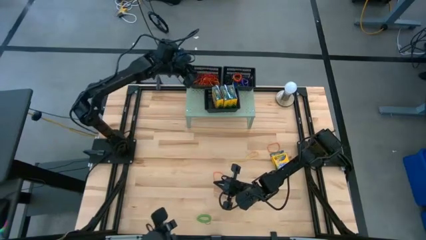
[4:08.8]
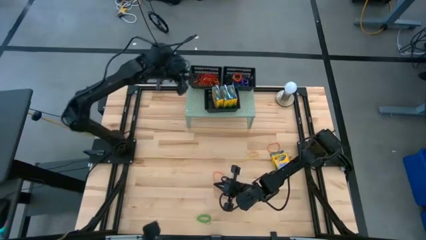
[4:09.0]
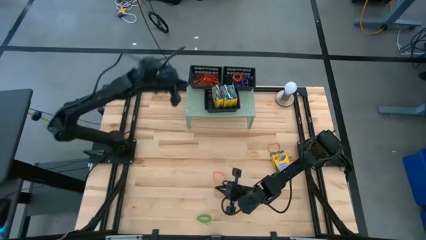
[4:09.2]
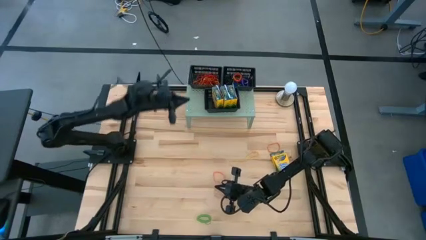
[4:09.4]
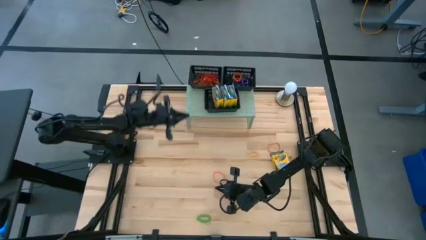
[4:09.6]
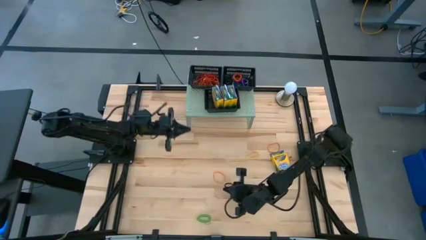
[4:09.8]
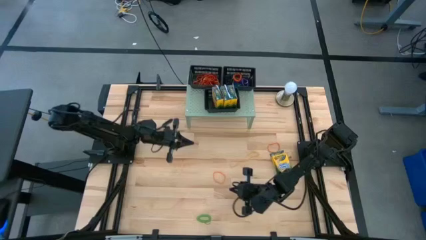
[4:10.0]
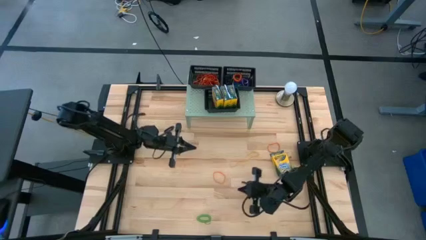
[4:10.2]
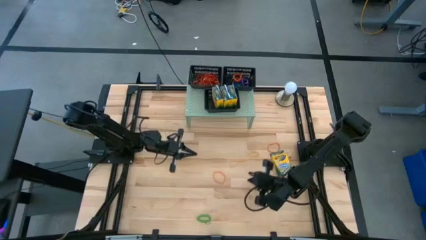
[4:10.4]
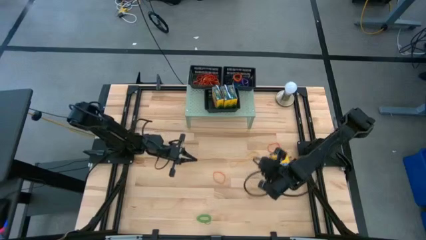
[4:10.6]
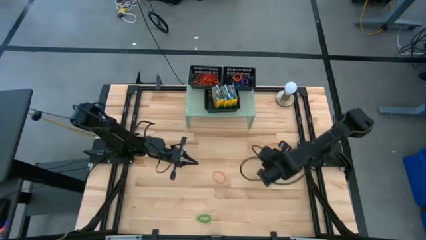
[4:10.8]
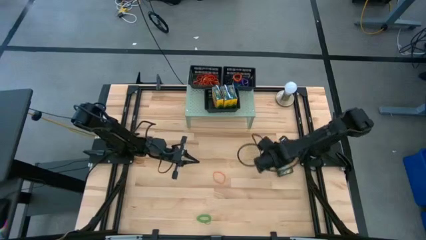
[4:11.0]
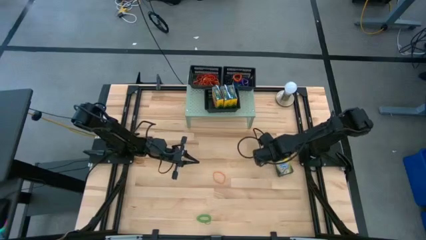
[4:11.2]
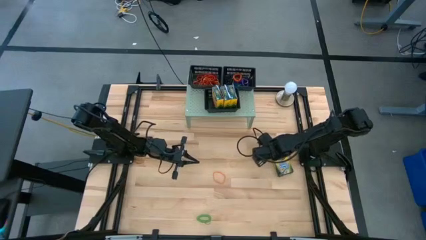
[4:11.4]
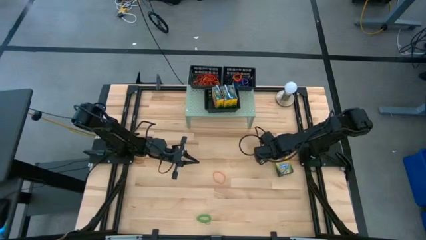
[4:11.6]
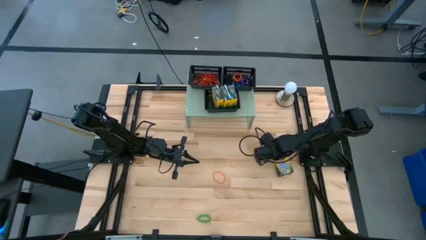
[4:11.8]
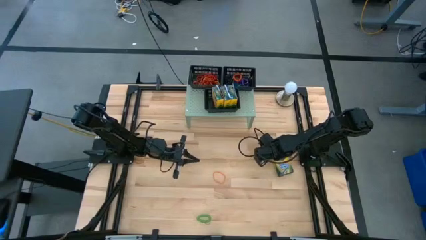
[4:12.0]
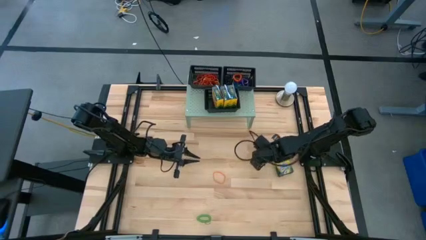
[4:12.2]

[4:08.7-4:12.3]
Task: Pick & Place Office Desk Supplies
Put the orange rubberband into the top left black bin

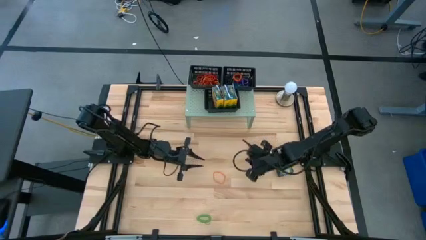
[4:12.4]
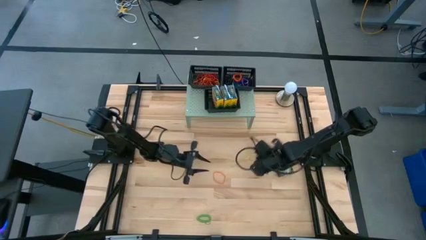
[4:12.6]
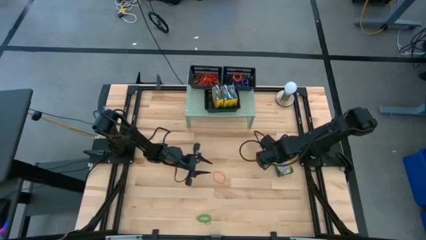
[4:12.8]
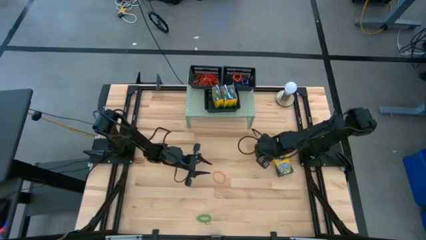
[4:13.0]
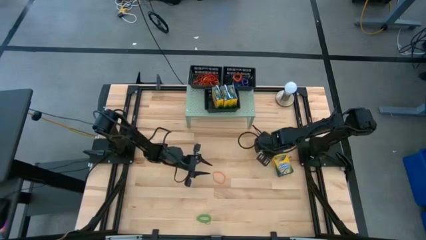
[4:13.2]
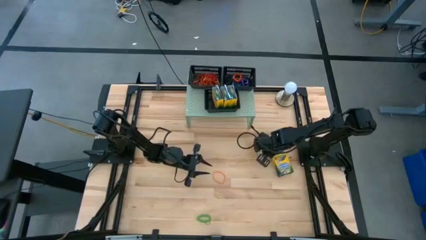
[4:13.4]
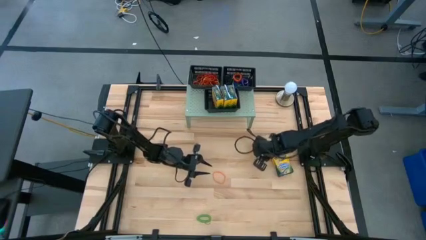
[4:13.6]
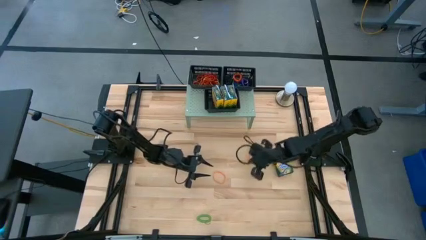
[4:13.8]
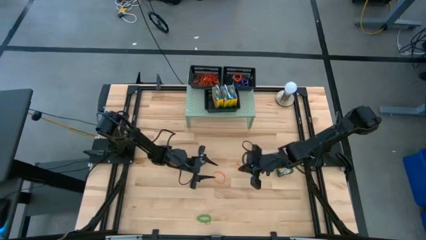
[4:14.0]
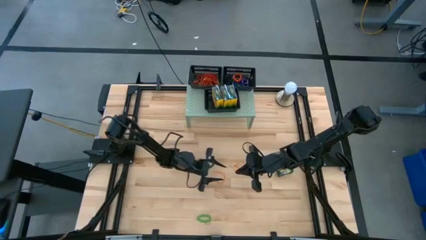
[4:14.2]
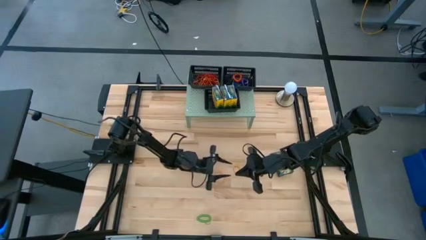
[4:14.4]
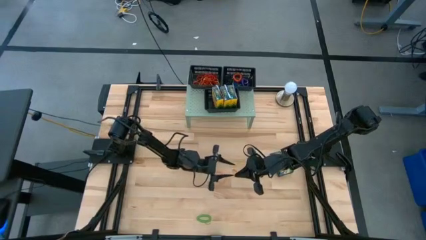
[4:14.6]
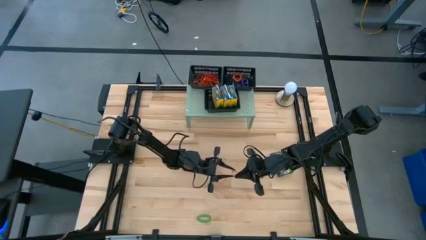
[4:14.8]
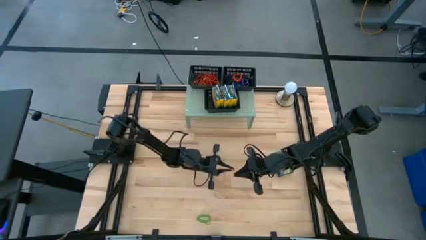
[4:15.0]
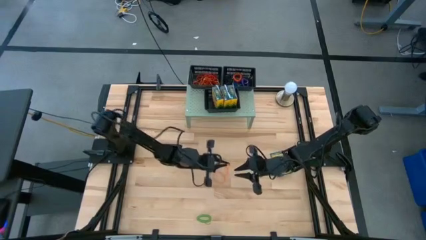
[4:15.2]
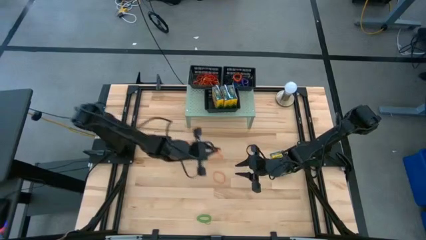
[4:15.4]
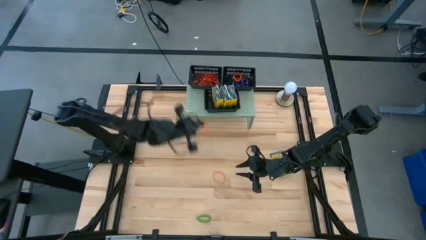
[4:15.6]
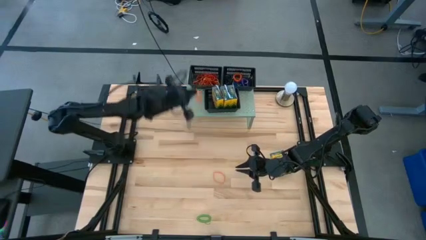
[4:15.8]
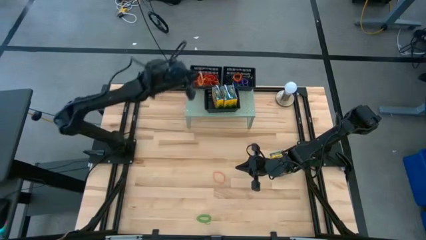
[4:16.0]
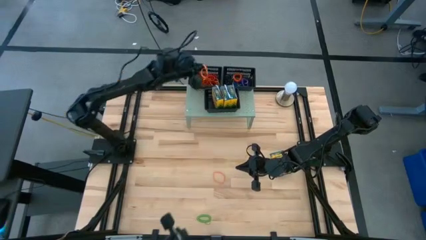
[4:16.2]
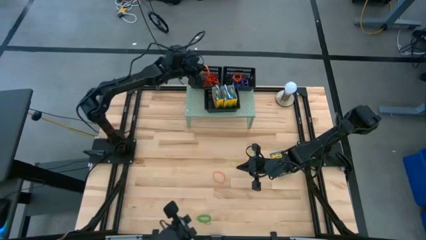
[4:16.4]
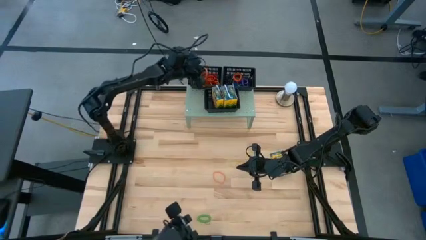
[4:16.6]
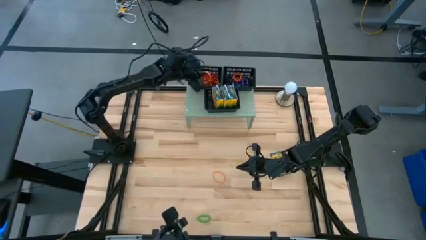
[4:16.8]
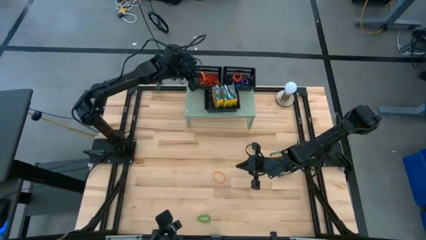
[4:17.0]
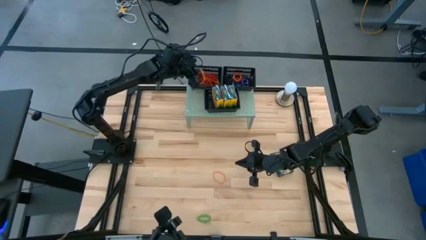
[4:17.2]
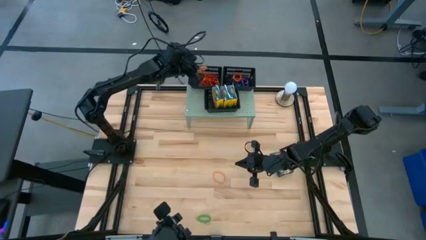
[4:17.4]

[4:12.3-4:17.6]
Put the orange rubberband into the top left black bin

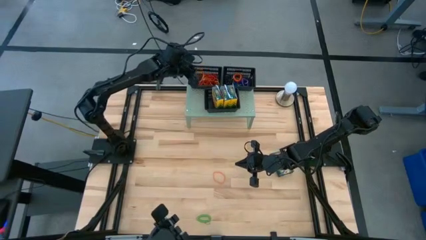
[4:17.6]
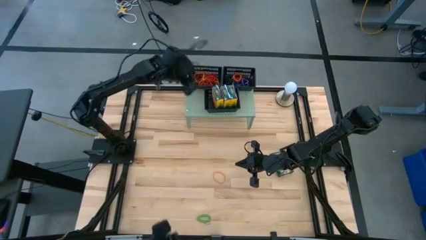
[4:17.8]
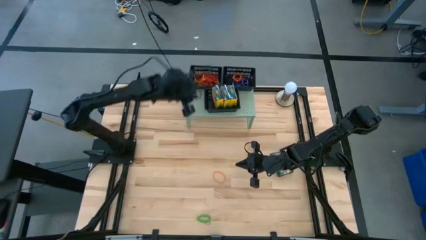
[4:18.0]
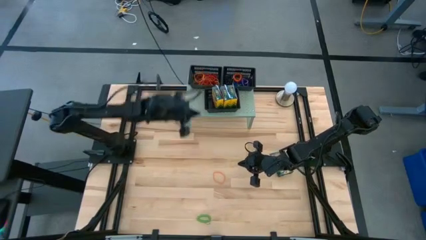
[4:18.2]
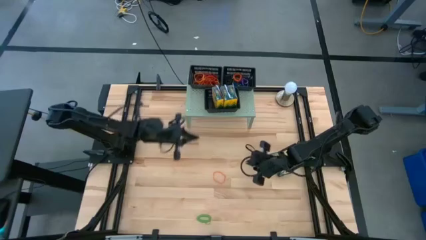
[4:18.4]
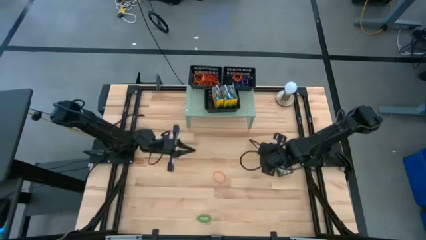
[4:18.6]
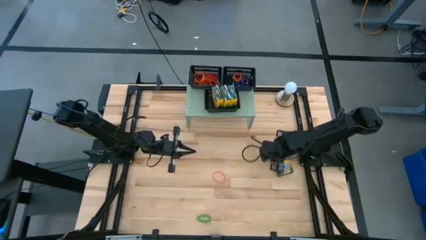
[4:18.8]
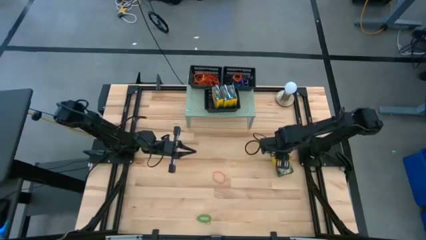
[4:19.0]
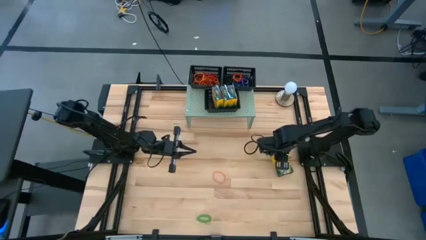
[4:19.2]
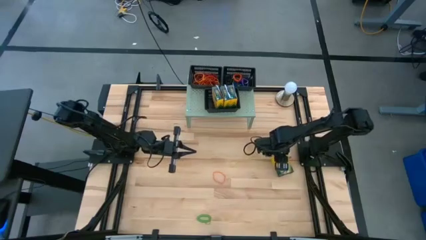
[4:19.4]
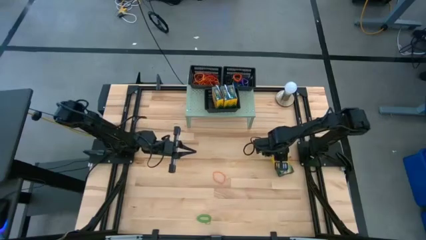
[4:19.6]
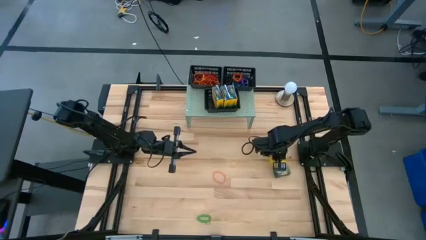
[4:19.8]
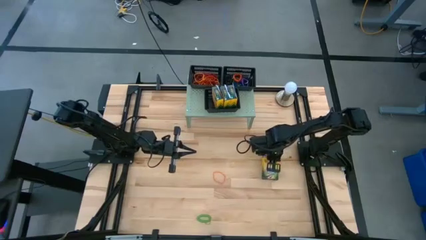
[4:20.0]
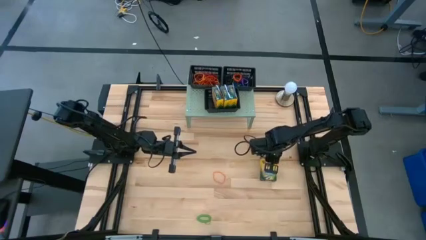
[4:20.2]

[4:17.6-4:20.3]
Put the yellow crayon box into the bottom black bin
